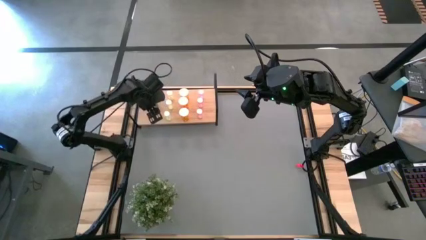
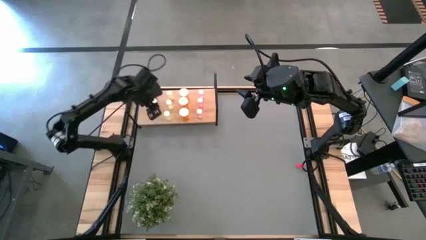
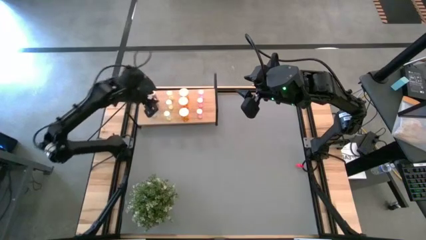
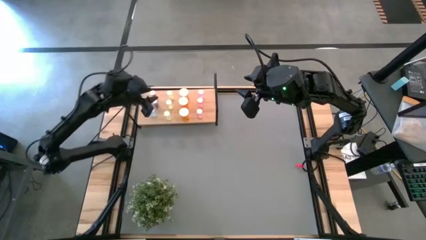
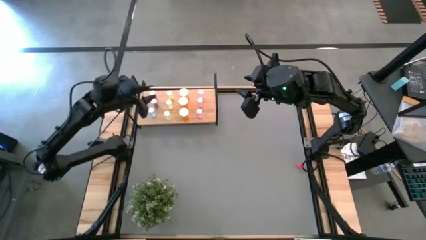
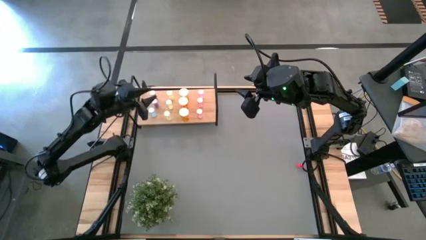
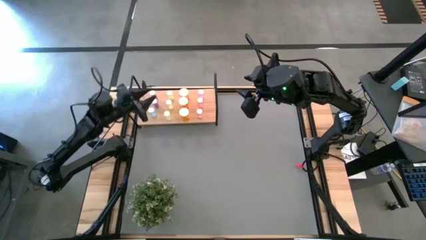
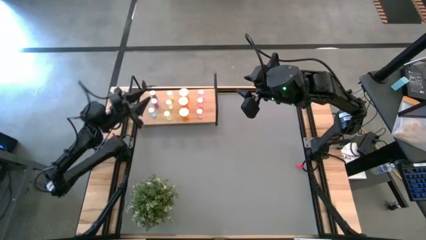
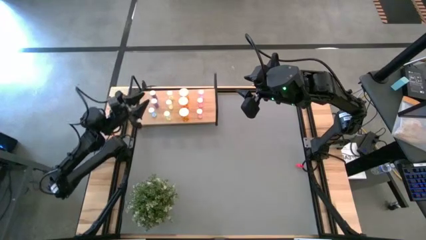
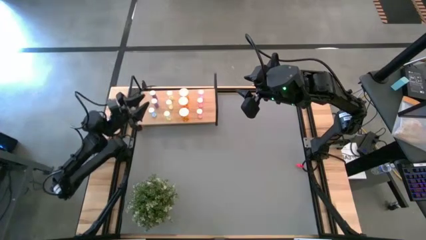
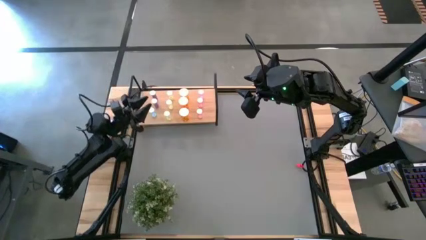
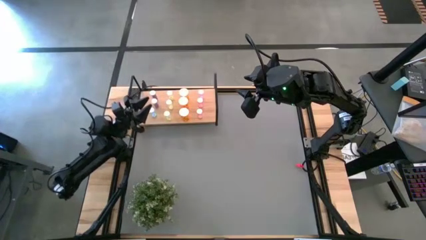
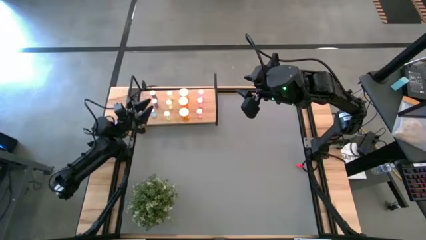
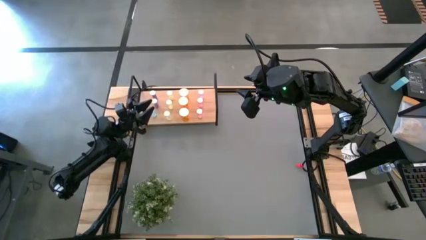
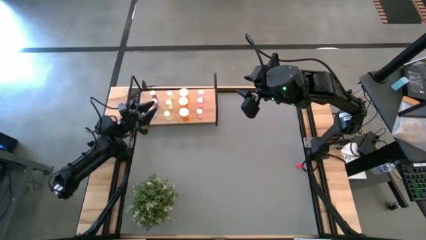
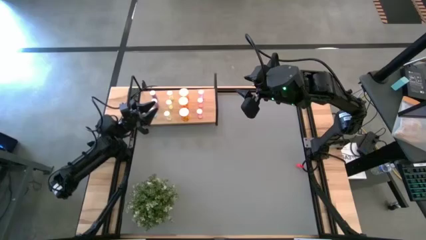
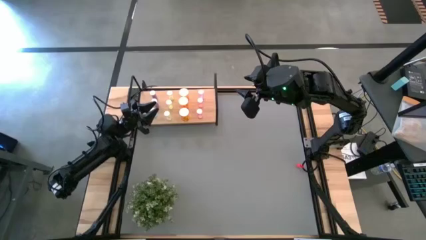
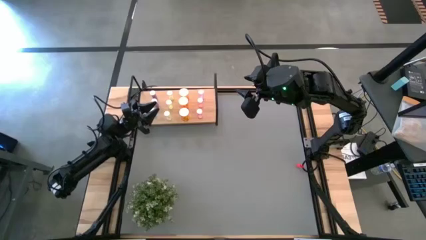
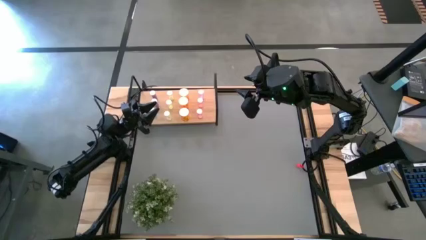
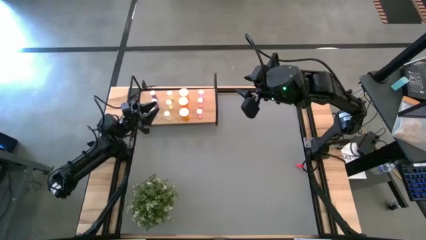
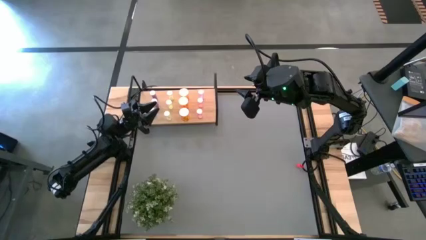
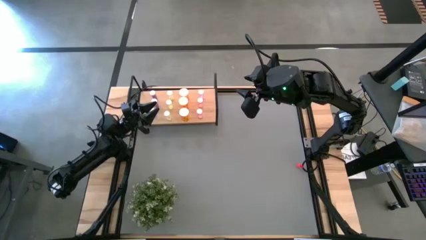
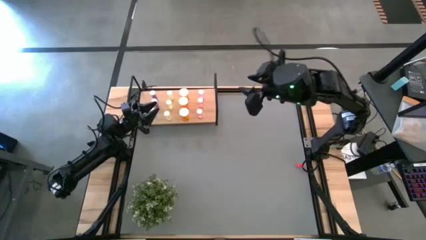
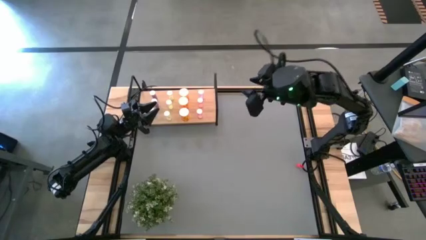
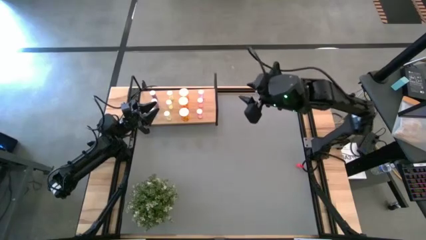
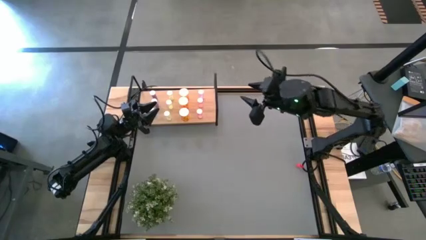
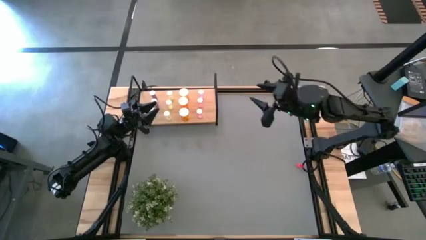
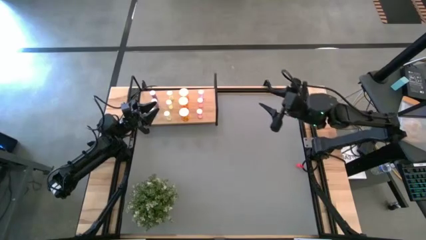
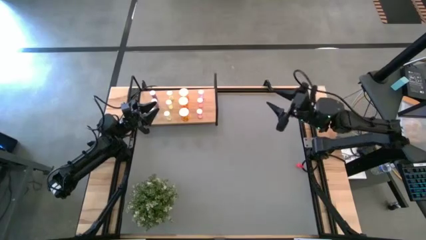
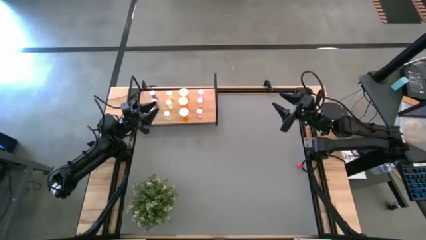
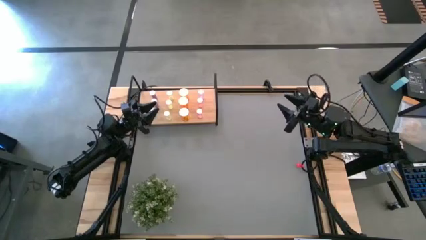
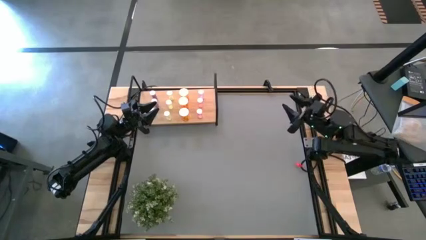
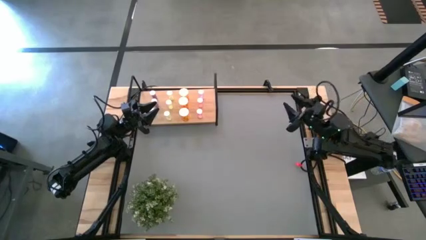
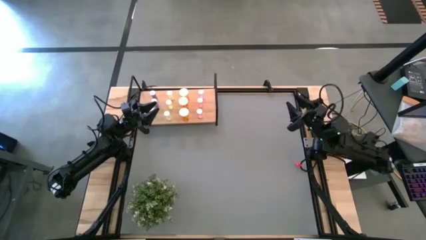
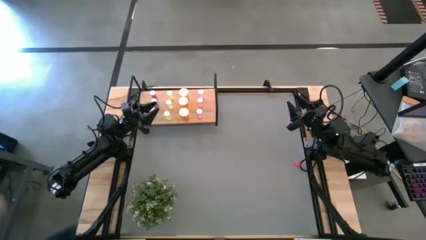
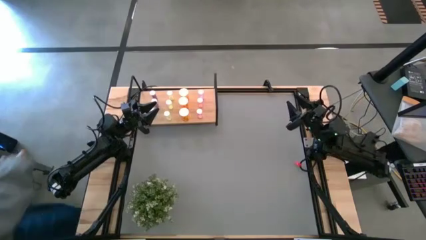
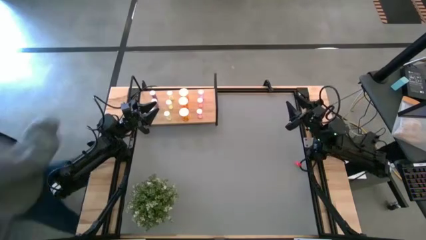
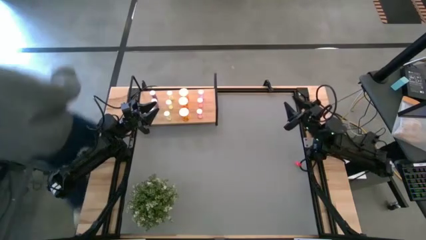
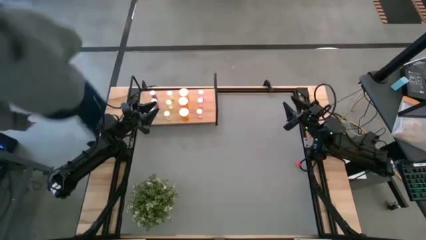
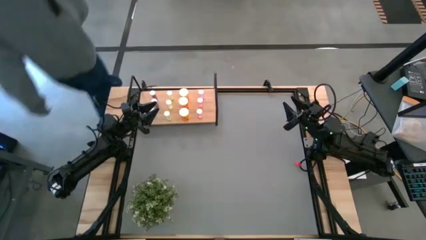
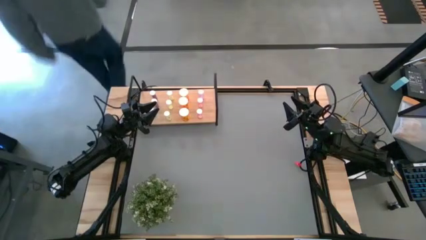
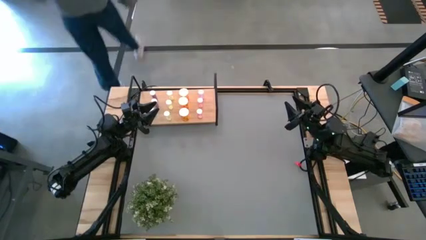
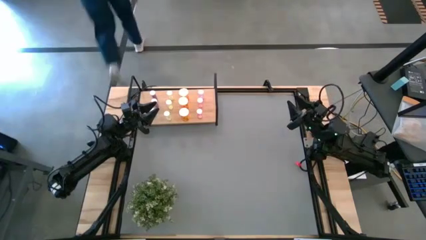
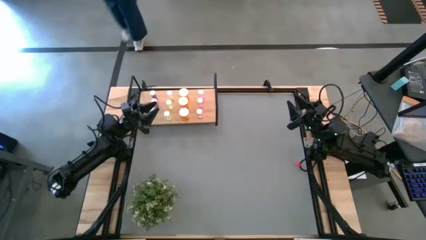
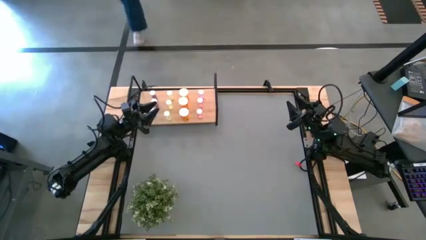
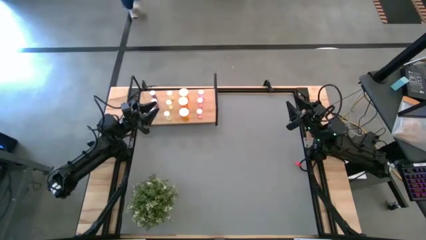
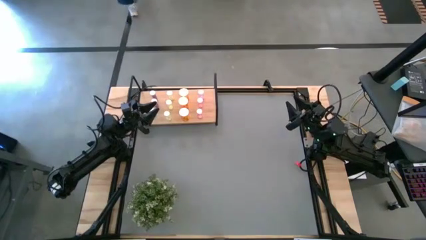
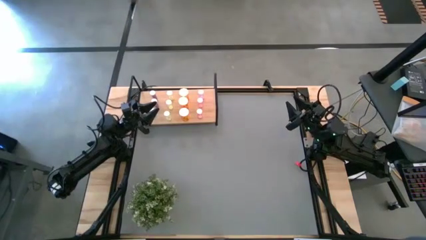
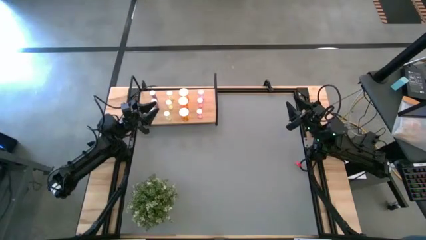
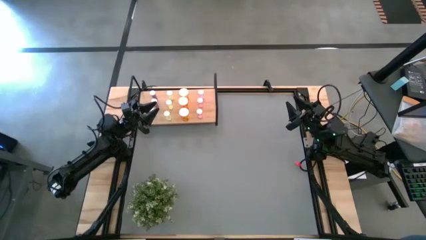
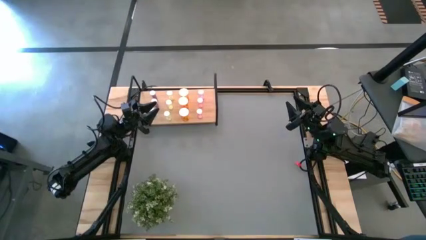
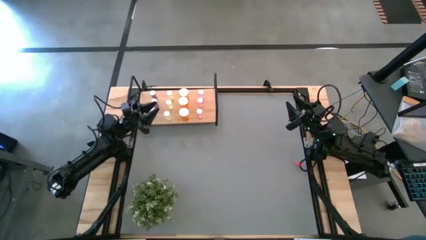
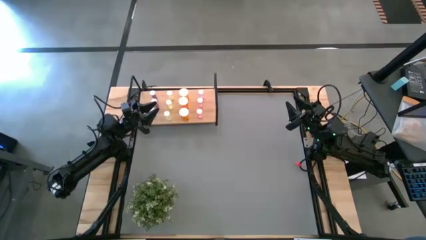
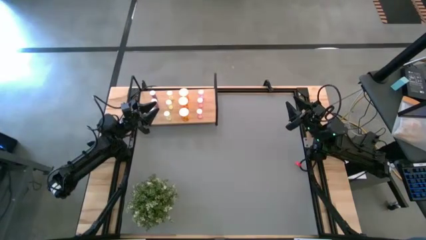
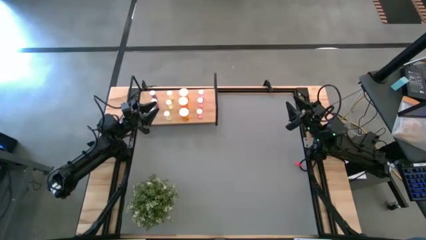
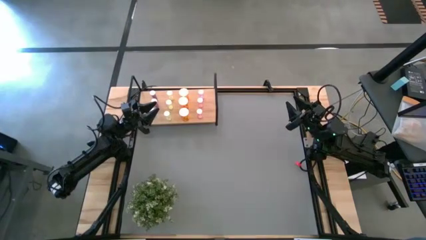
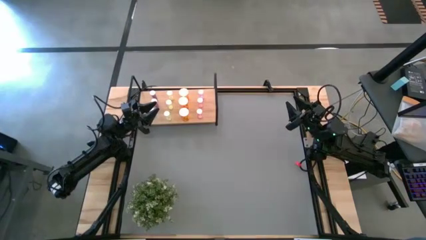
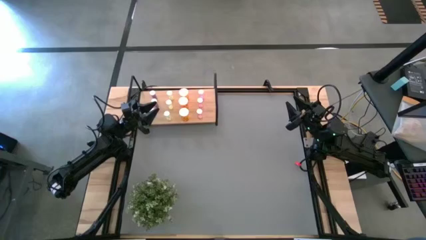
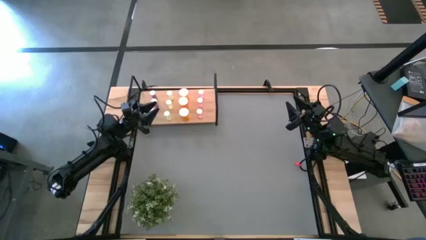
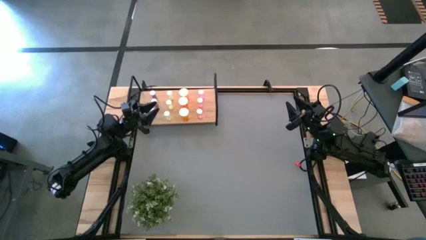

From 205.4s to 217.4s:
Task: Pick and place medicine bottles onto shelf by color
Return to Home Position
